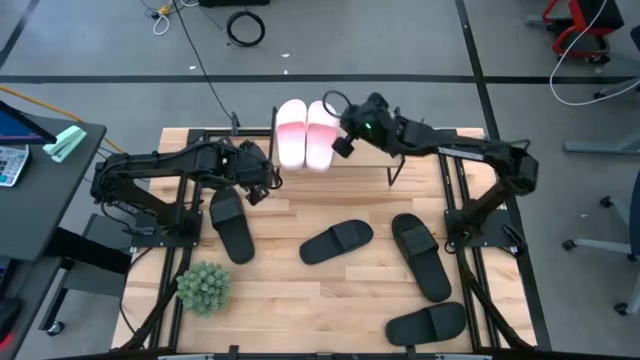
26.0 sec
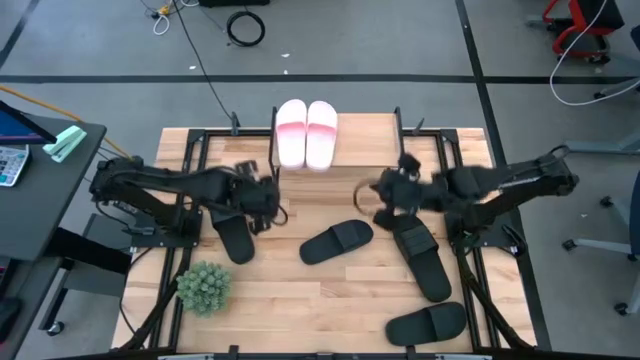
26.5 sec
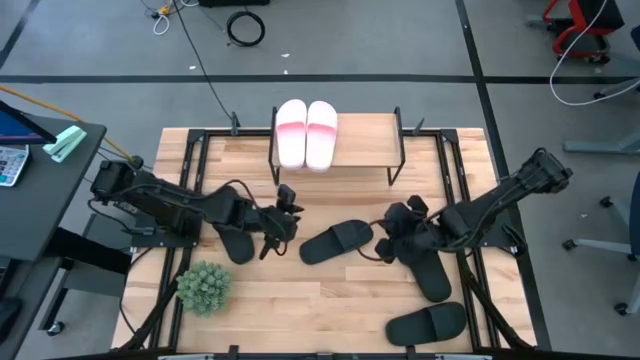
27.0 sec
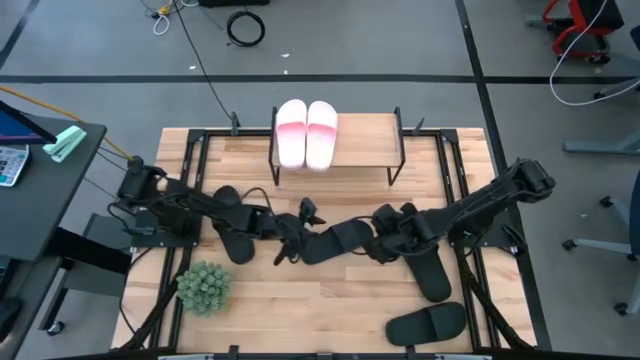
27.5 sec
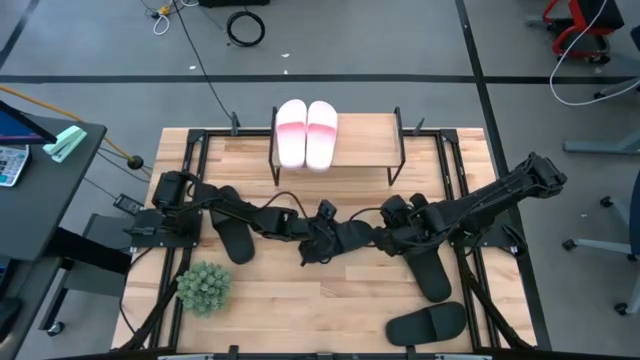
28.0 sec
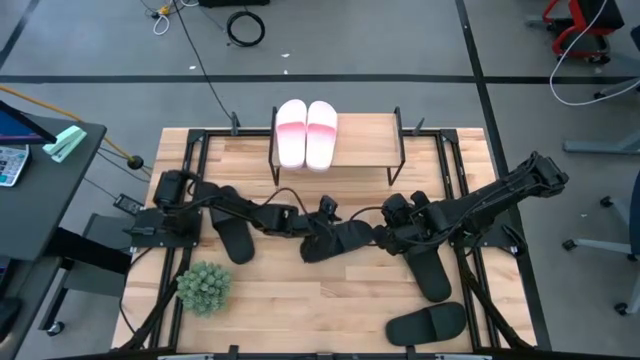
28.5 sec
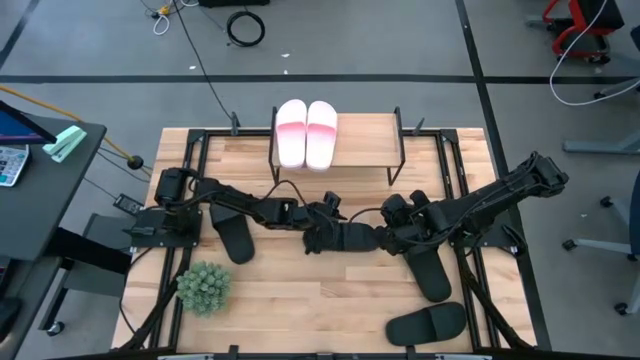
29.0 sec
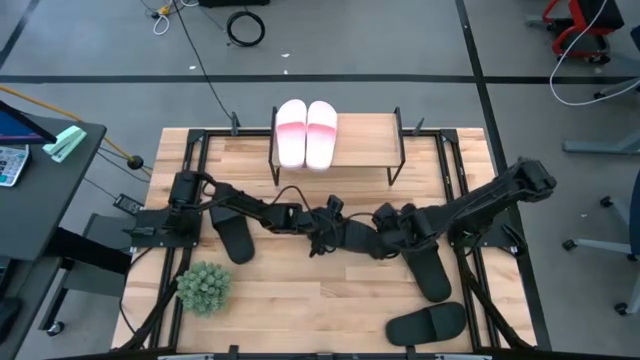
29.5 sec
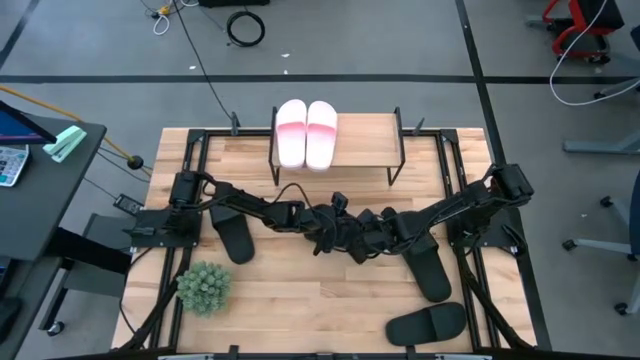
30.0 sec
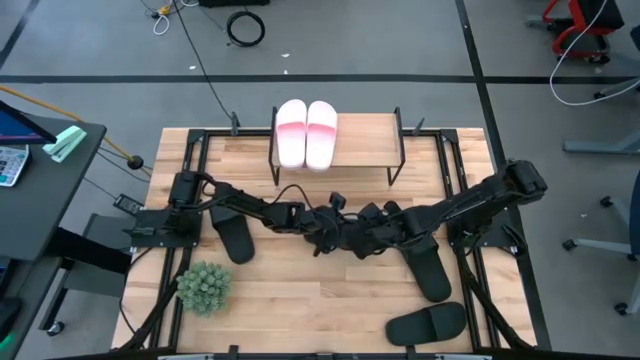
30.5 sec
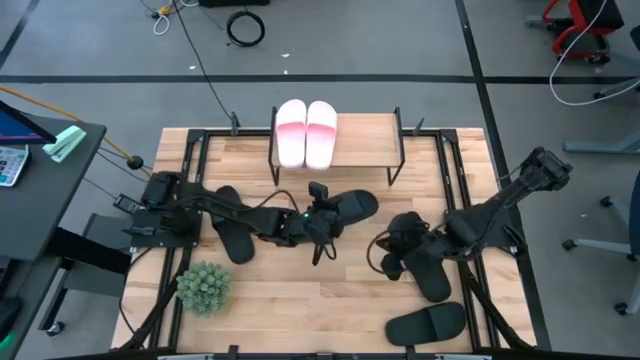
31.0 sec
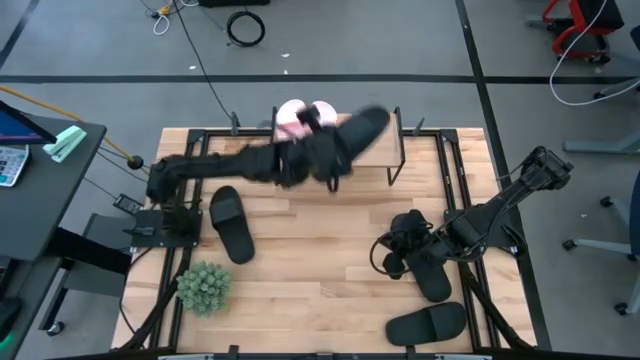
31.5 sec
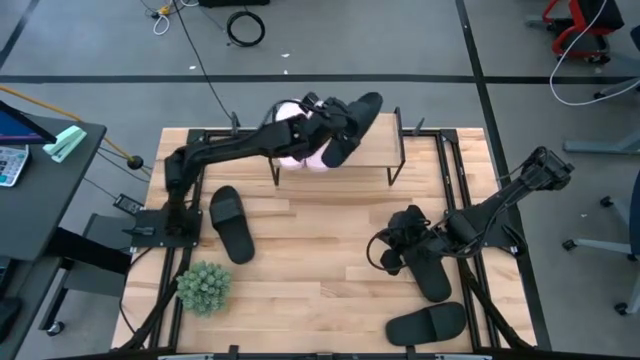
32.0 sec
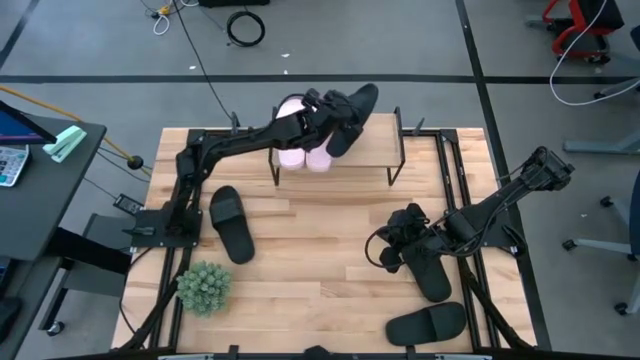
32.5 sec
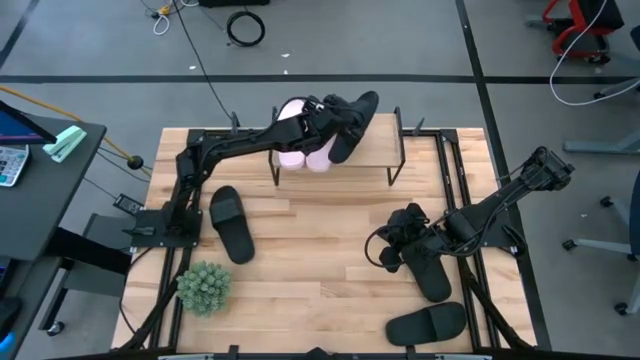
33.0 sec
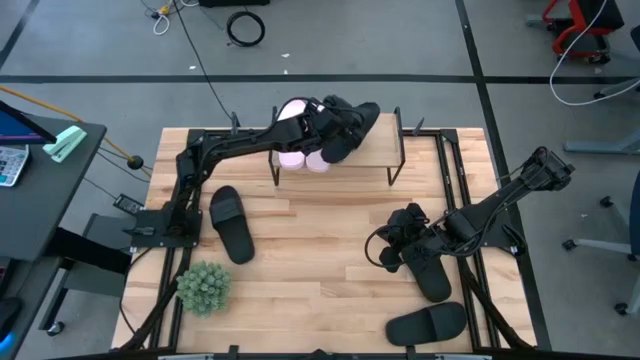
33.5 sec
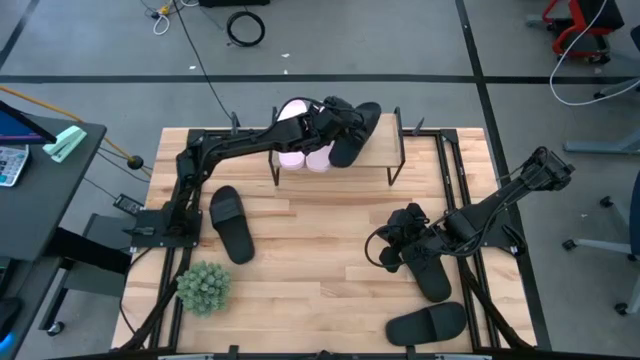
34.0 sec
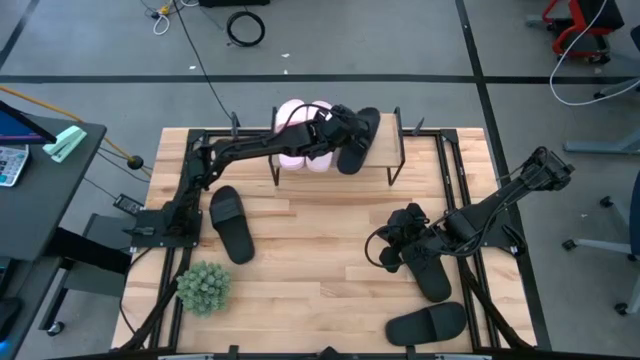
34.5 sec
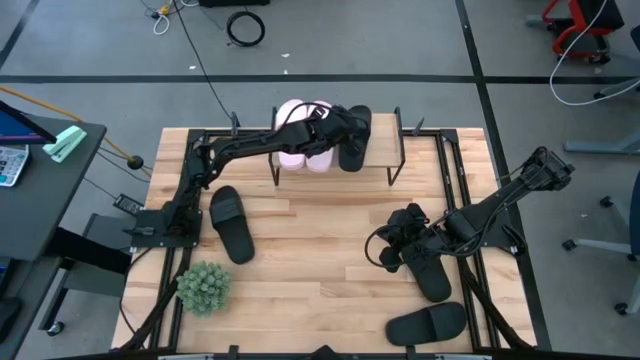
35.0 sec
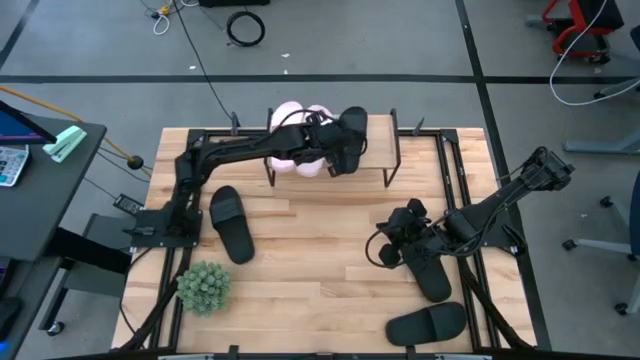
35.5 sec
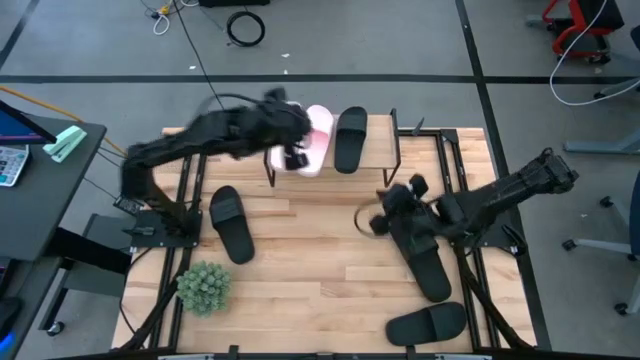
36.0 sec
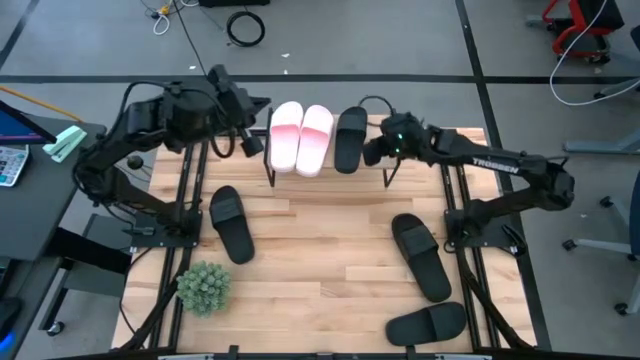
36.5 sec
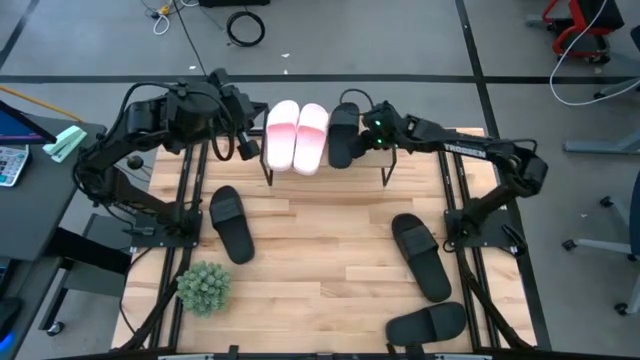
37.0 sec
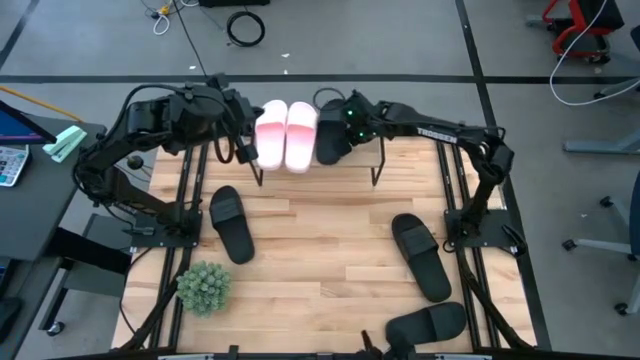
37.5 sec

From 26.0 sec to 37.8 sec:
Task: Pick and place slides into the shelf
Put the black slides on the shelf

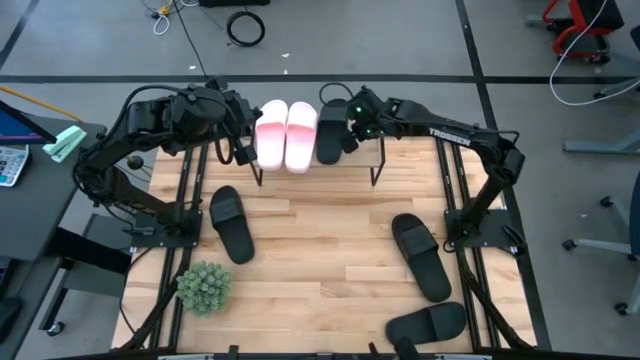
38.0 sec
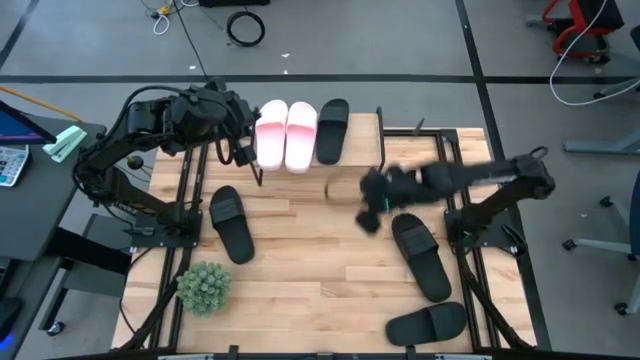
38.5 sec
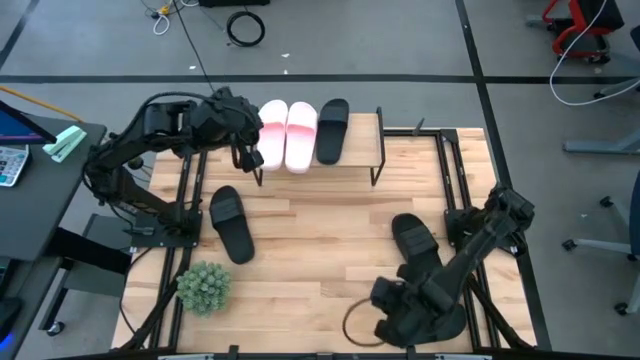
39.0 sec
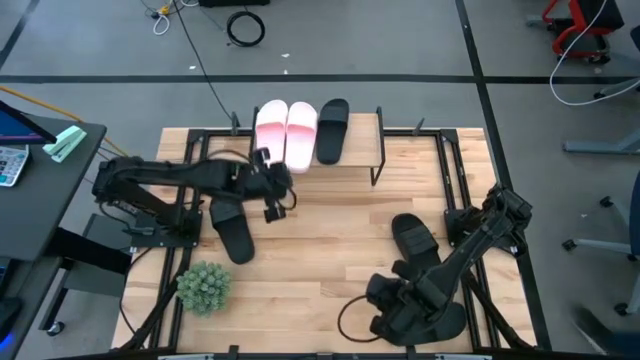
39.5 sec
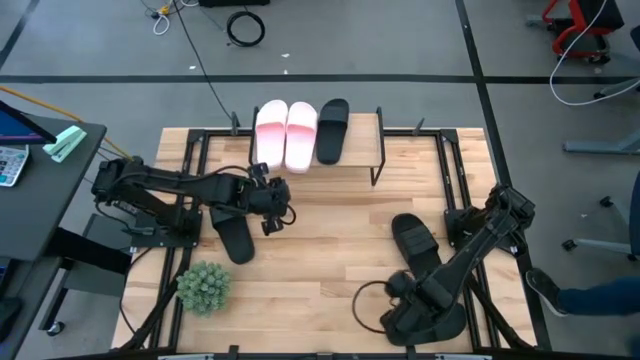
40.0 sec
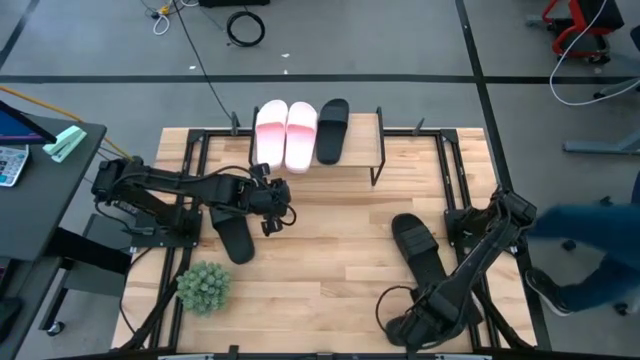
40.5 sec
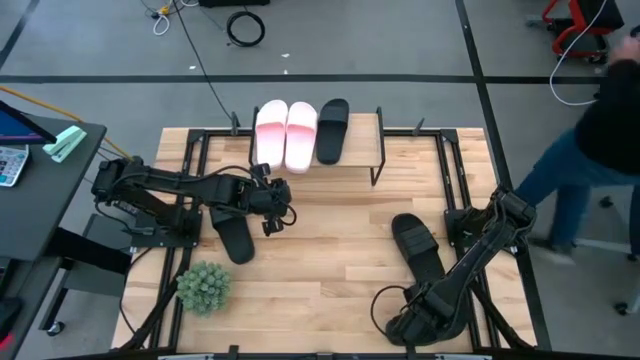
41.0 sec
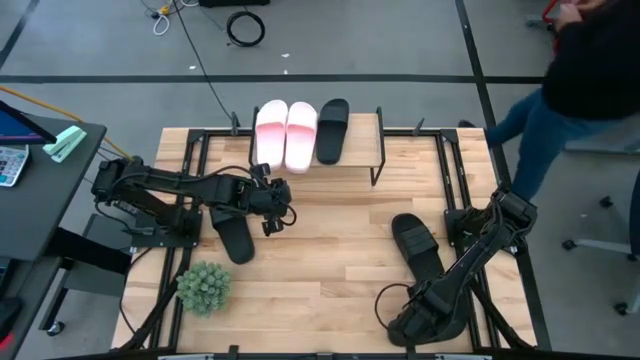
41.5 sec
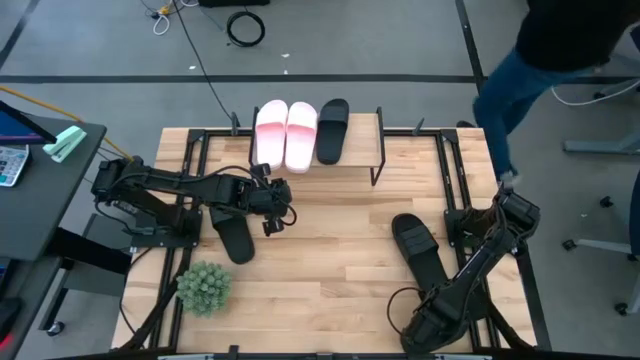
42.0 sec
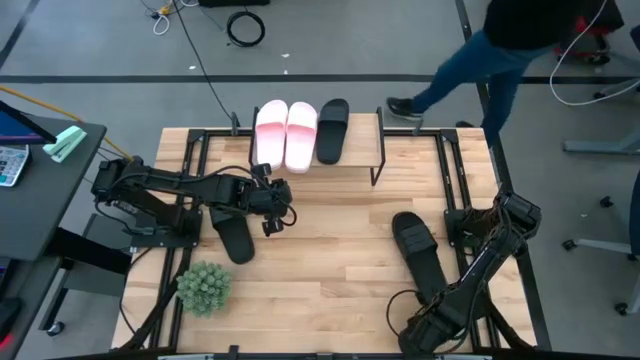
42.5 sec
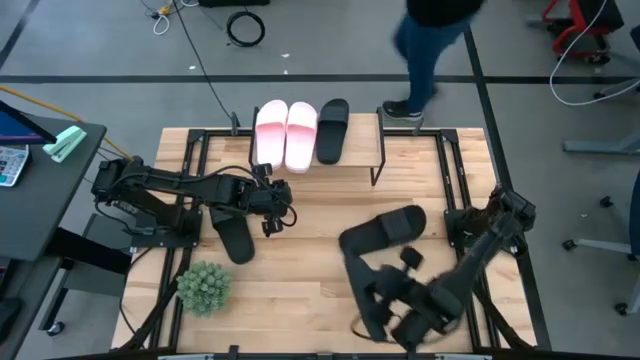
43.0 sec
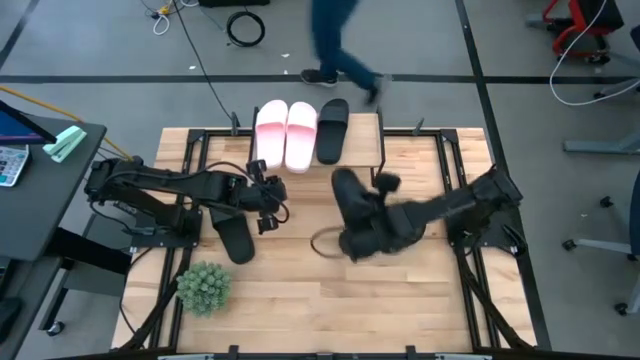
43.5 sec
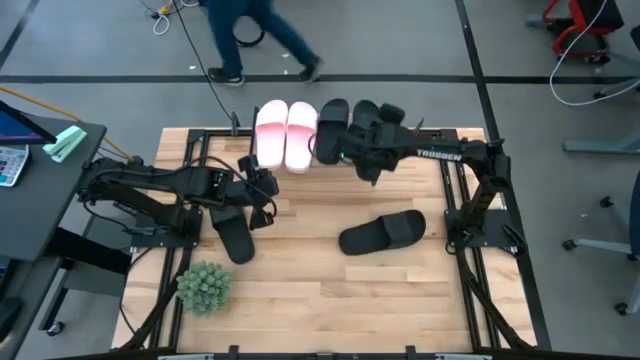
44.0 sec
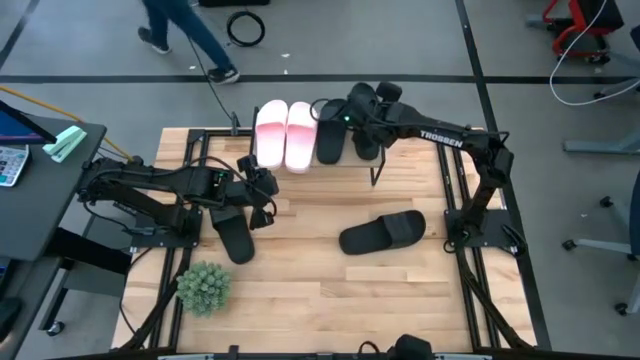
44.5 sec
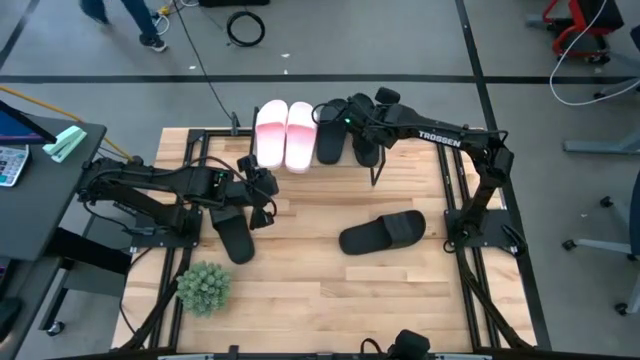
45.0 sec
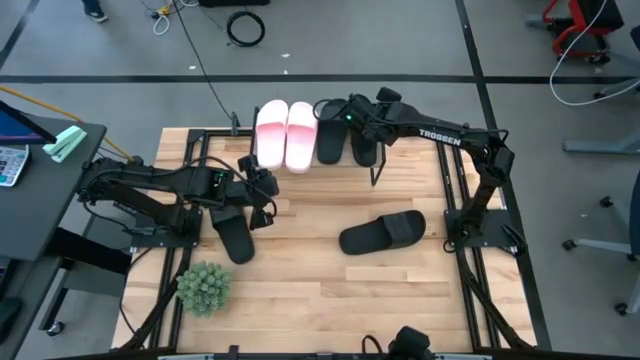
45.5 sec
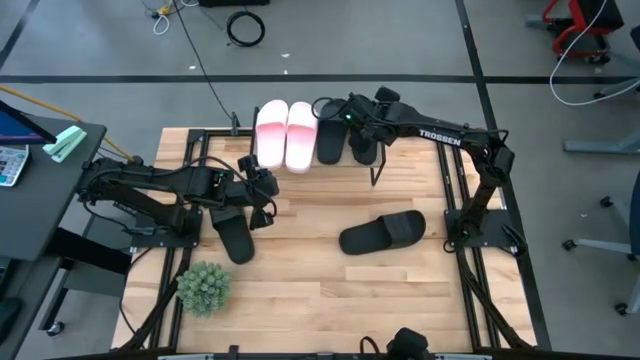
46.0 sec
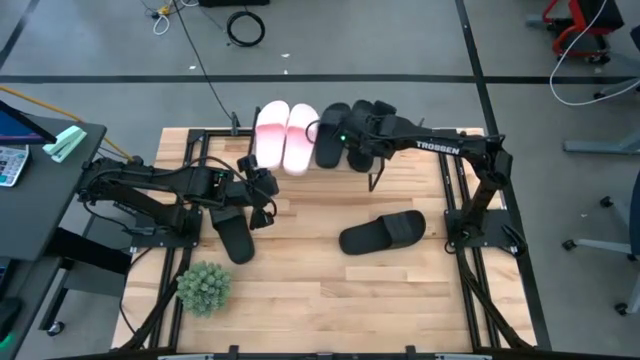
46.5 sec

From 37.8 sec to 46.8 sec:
Put the black slides on the shelf

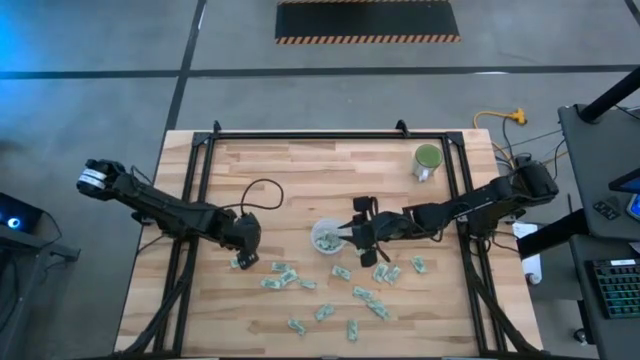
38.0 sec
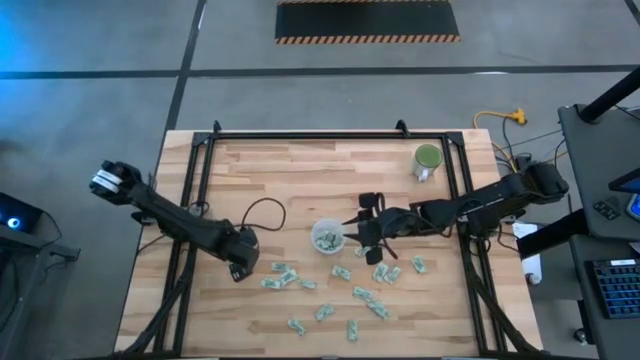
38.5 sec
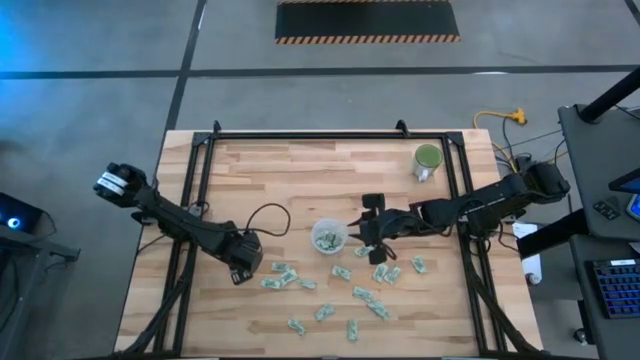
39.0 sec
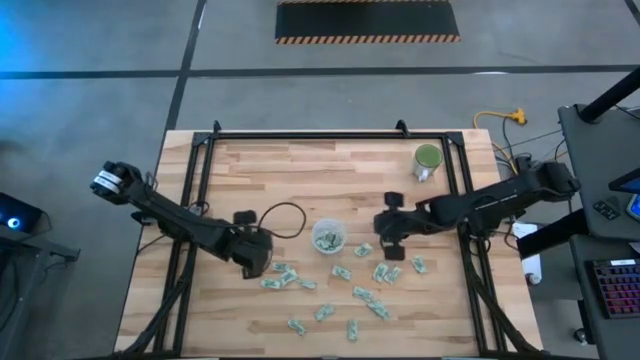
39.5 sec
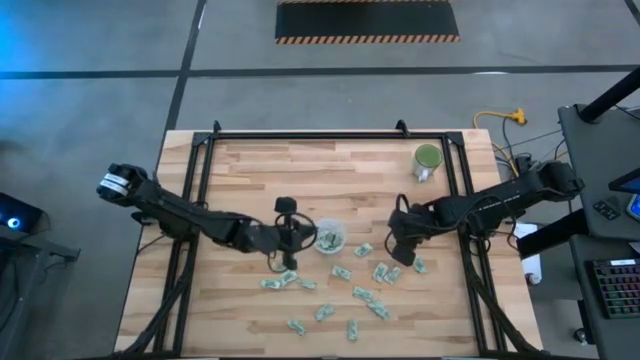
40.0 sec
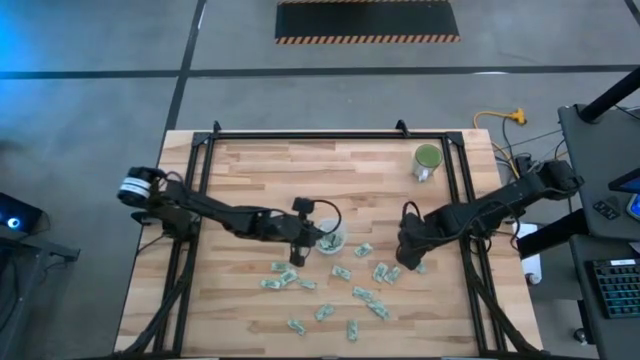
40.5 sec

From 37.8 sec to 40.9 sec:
Task: Pick and place Stevia / Truvia into bins
Put the light green stevia packet into the transparent container
